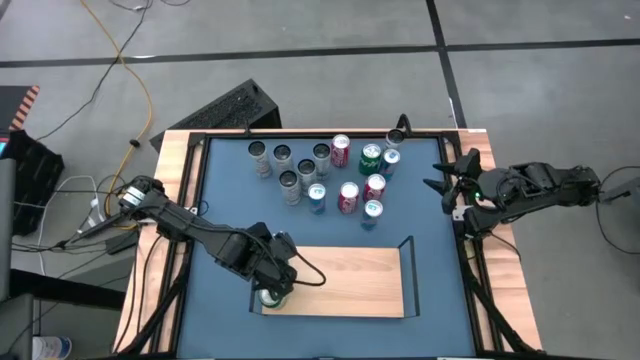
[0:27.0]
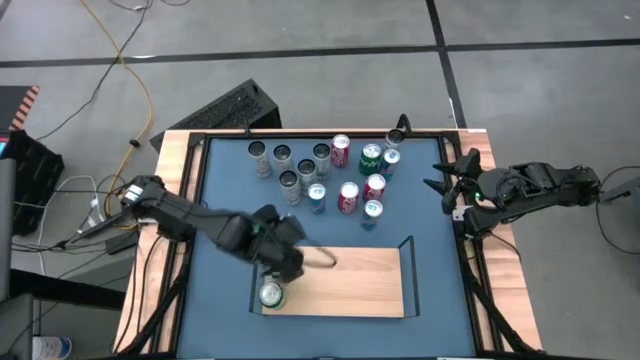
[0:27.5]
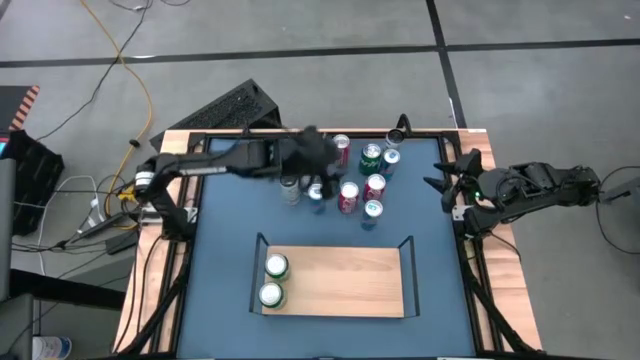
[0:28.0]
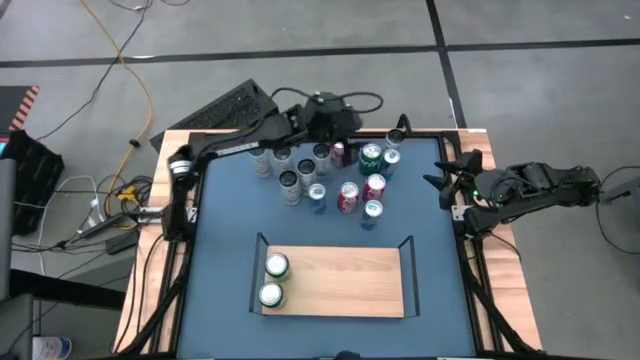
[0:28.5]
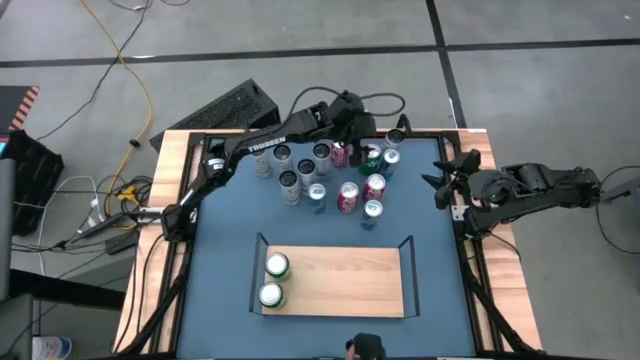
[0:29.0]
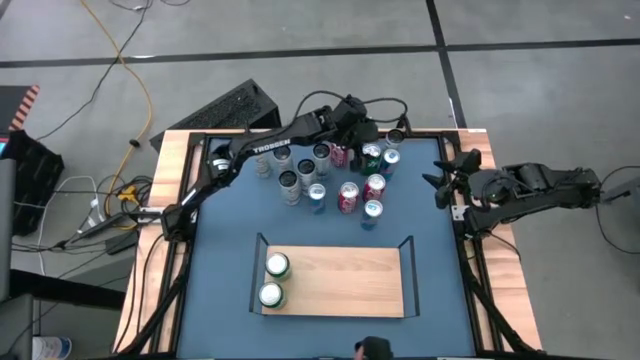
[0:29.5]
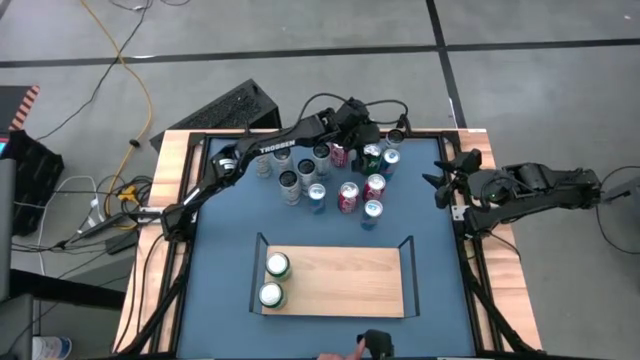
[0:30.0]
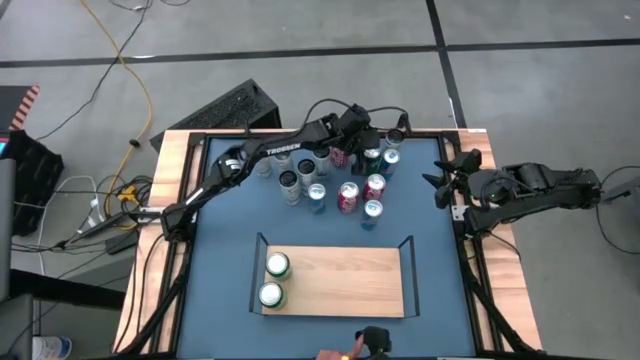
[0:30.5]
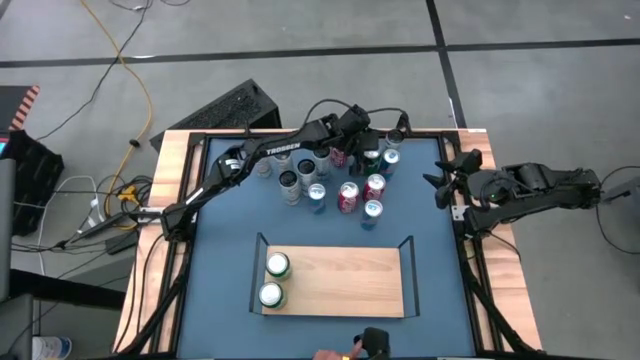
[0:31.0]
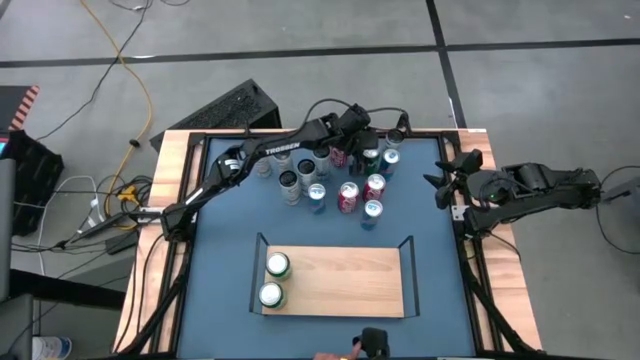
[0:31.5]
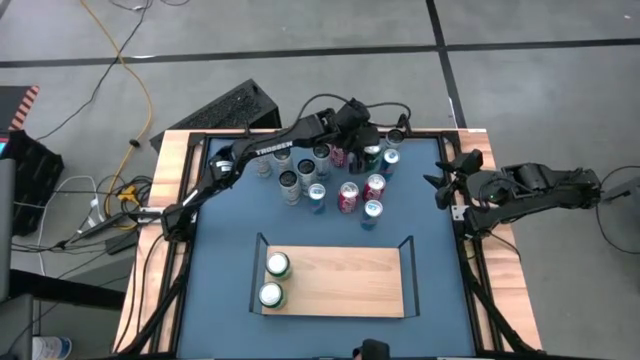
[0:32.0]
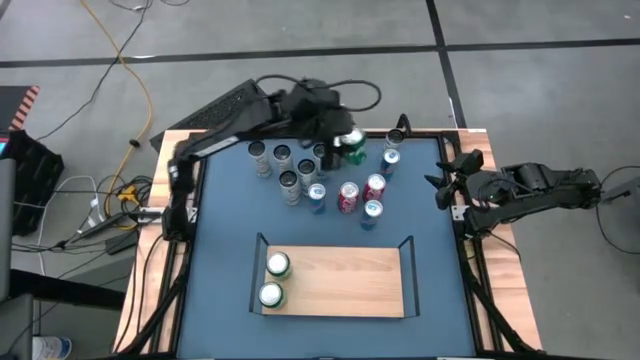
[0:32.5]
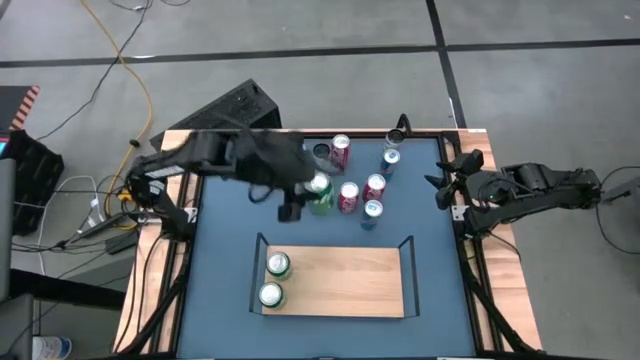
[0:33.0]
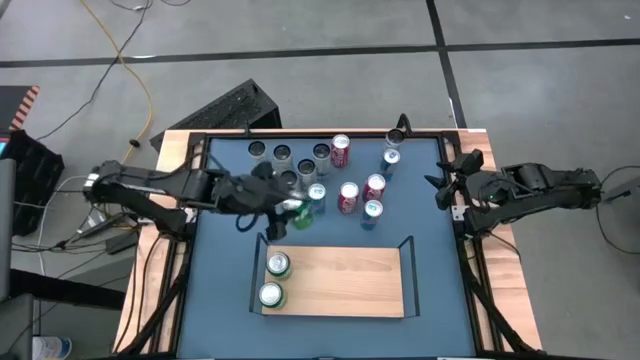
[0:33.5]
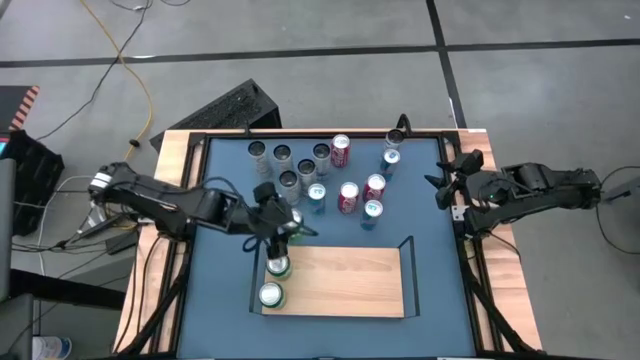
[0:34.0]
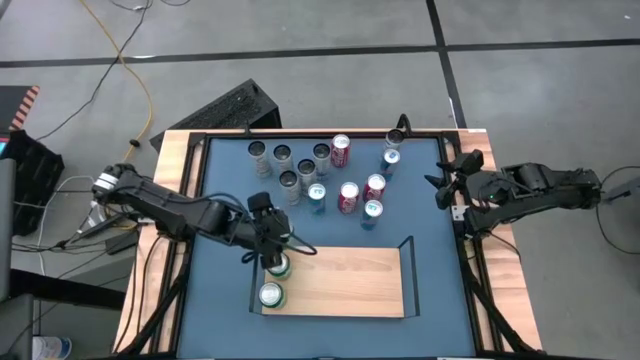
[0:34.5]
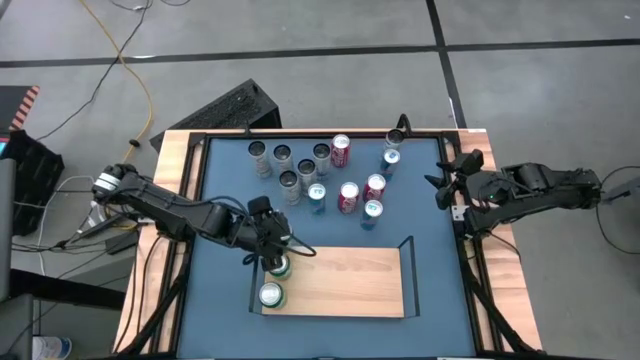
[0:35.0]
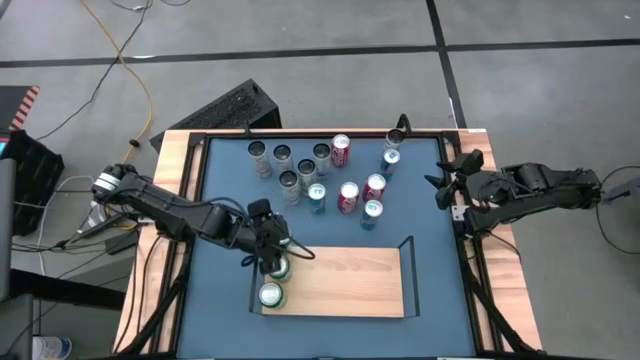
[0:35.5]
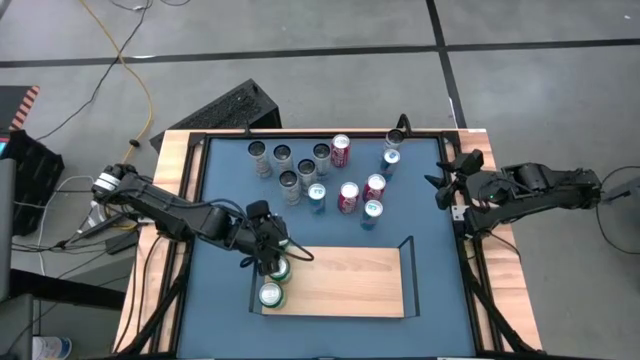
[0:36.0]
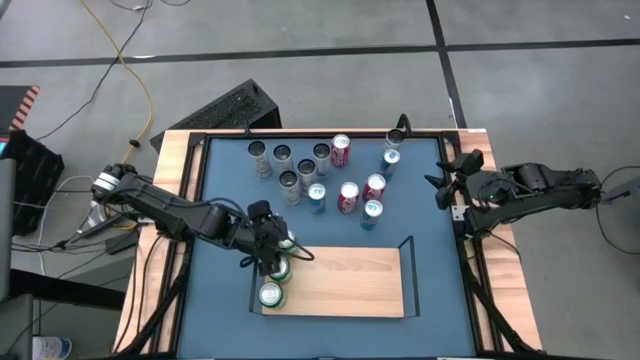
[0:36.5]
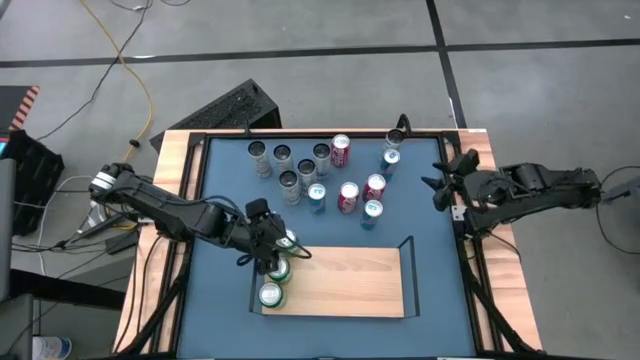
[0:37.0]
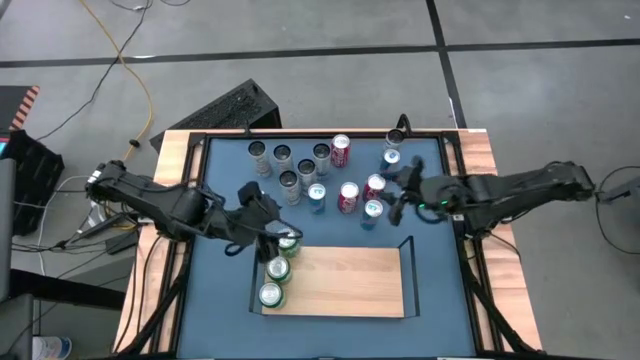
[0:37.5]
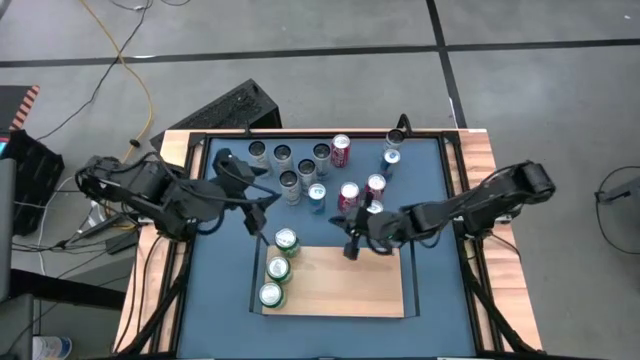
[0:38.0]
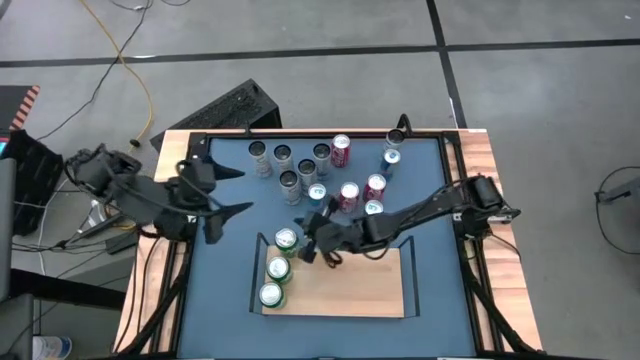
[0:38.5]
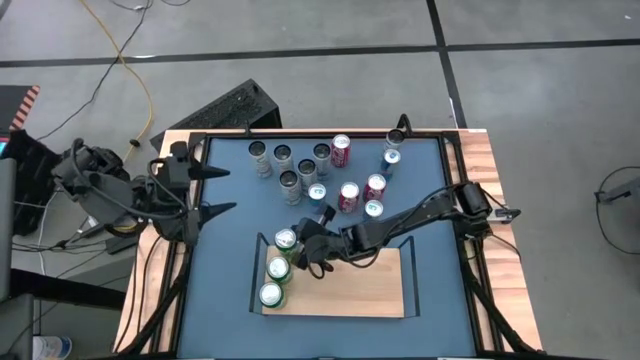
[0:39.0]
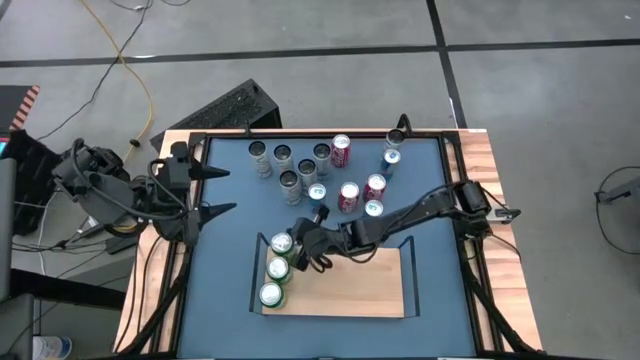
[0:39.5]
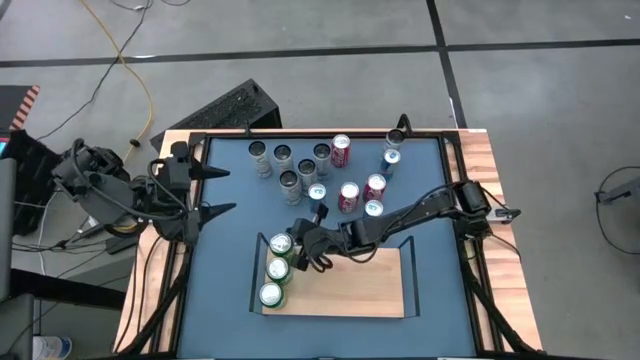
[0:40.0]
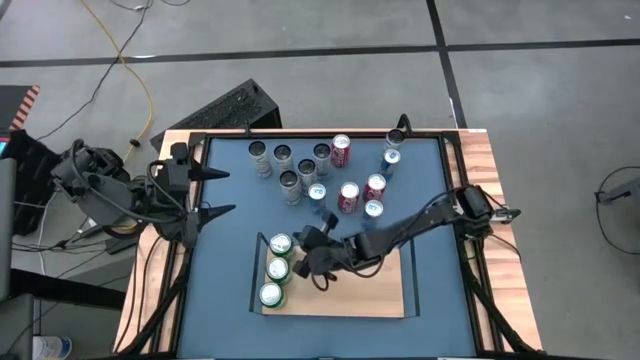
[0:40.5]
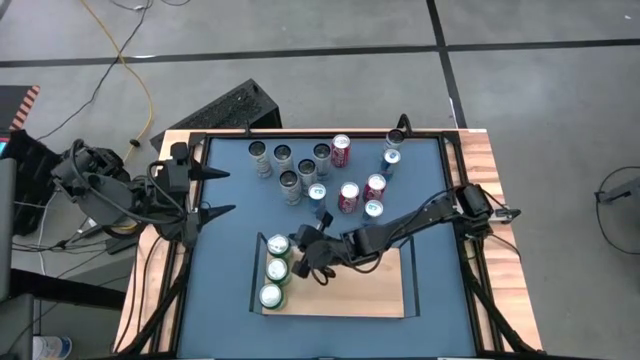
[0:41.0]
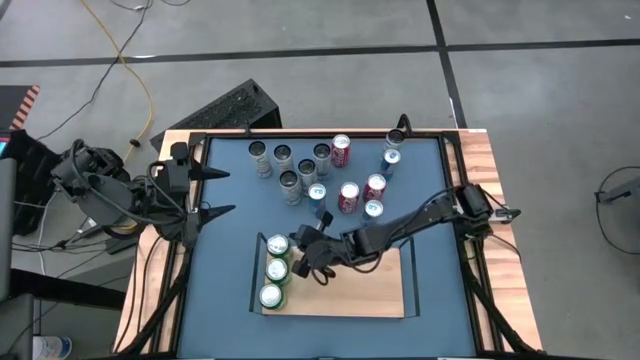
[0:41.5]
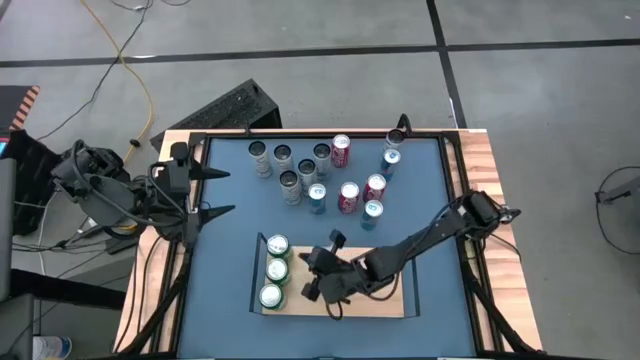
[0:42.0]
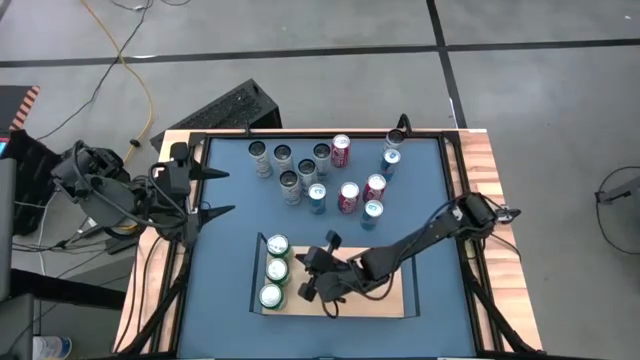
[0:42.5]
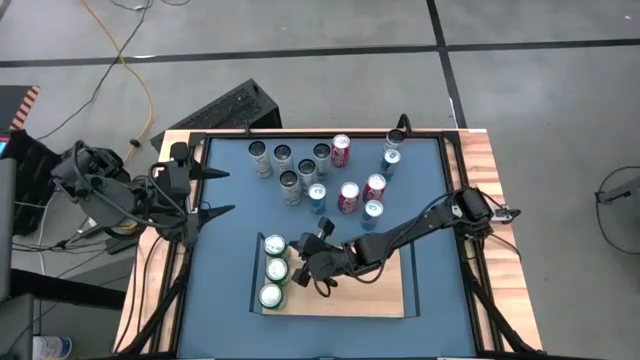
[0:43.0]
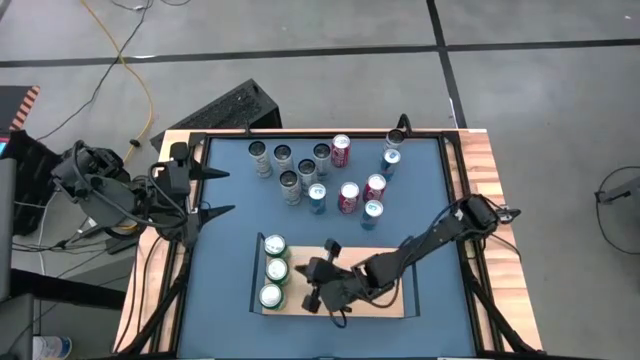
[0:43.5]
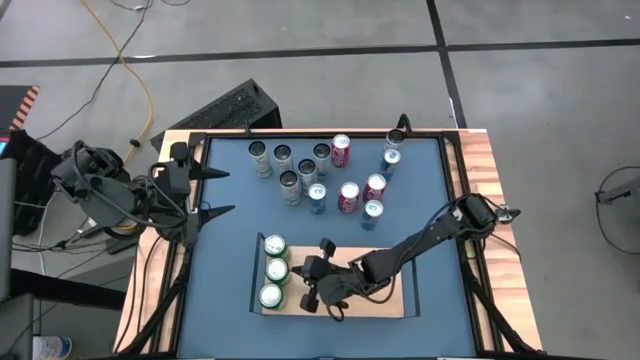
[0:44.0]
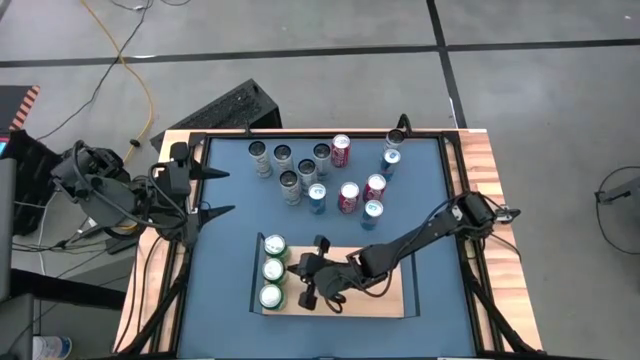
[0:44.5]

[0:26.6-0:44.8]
Task: Place canned beverage on shelf
Put the green soda can on the shelf aligned with the other green soda cans

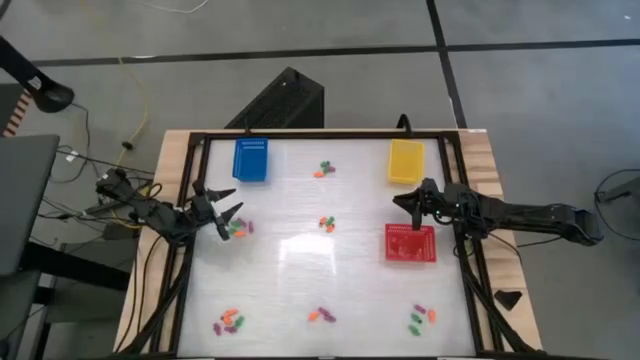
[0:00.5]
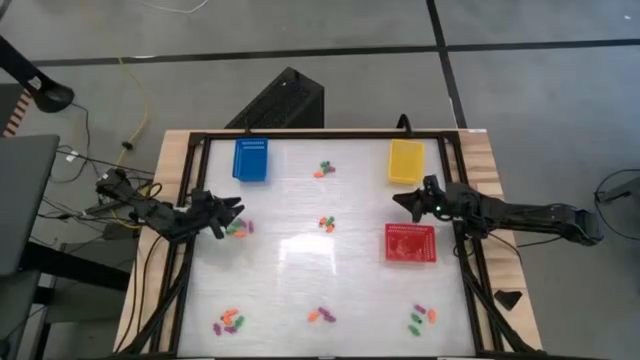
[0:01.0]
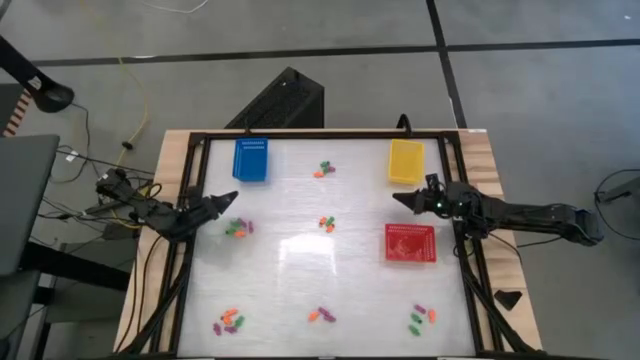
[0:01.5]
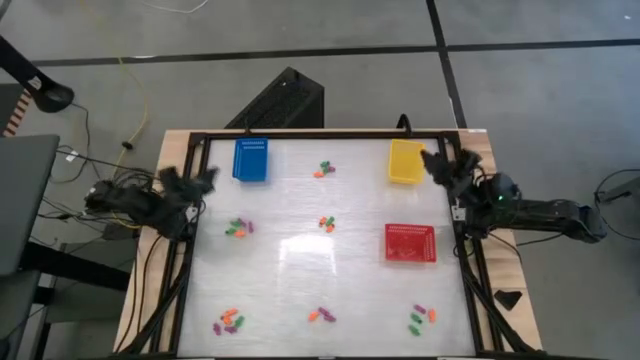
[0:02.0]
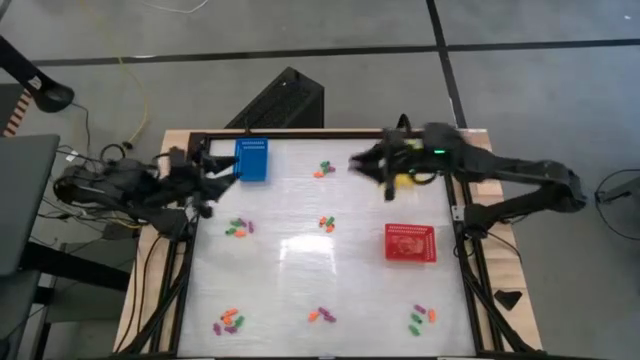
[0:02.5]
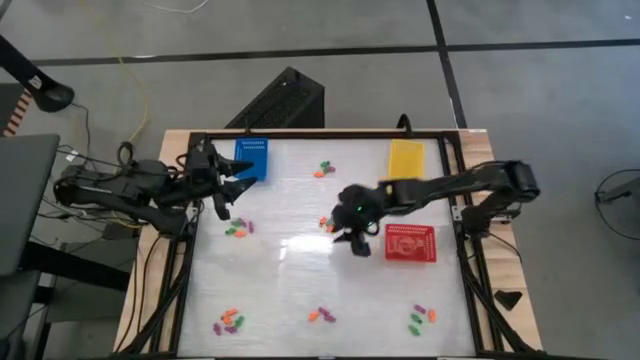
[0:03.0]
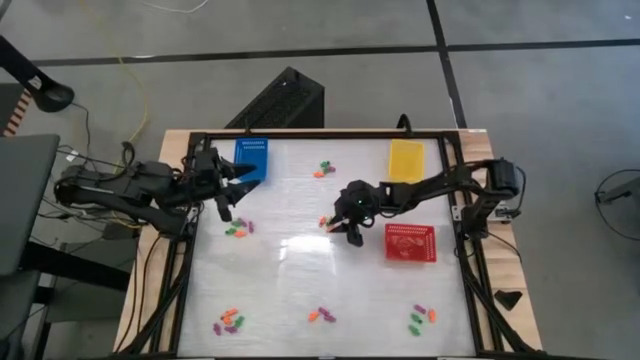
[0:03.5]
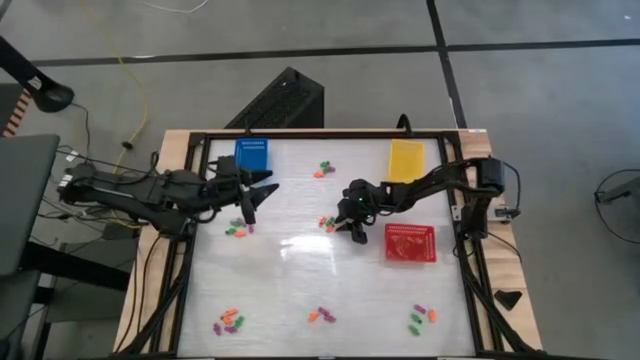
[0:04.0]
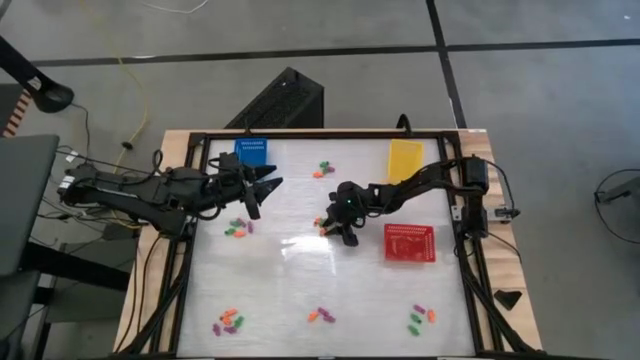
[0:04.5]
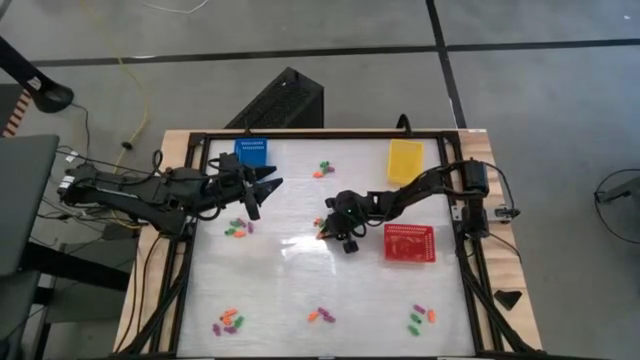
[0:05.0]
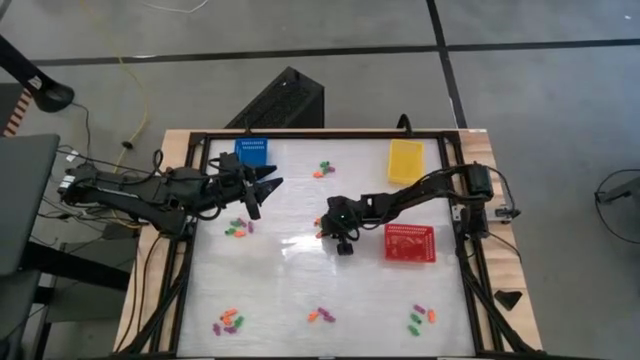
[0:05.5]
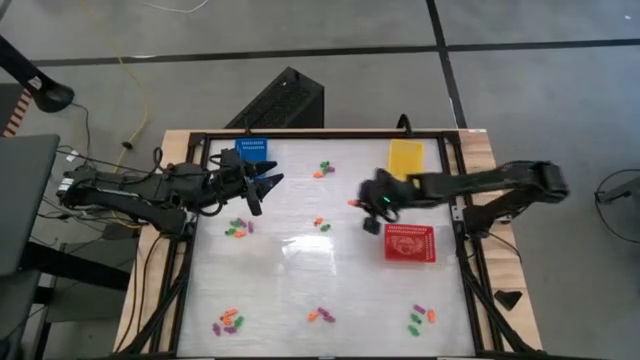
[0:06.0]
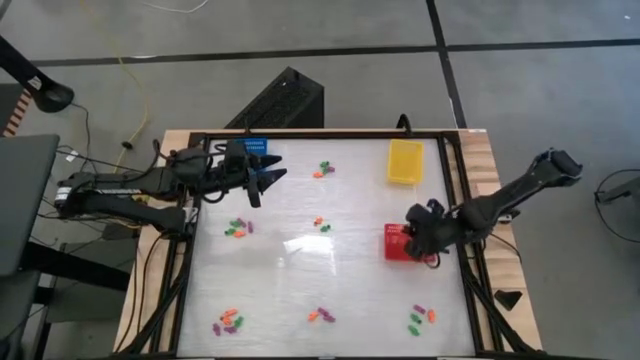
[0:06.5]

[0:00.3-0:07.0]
Task: Sort Halloween decoration
Put the orange skeleton toy into the red bin
